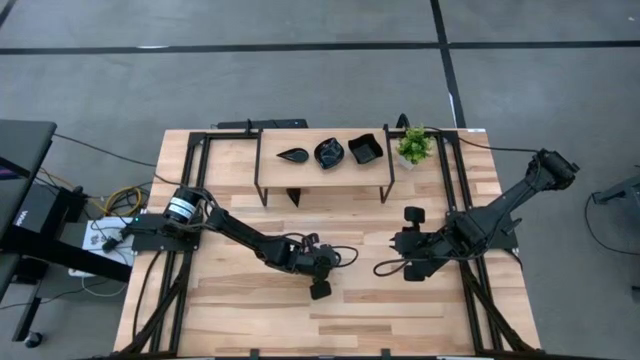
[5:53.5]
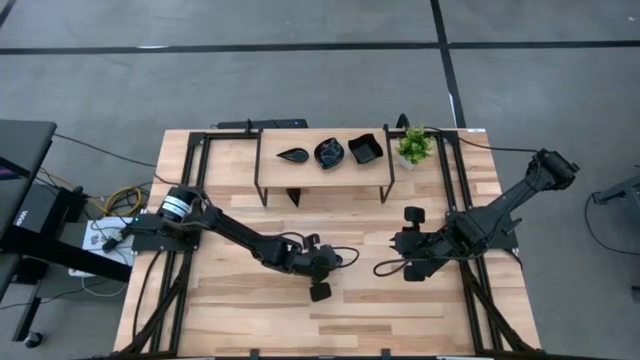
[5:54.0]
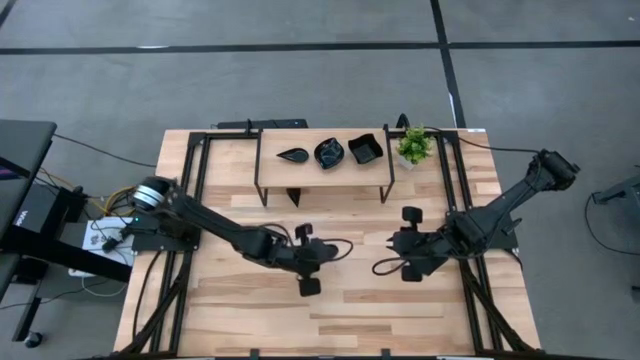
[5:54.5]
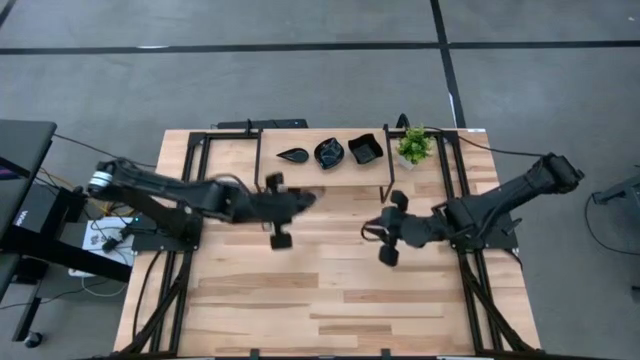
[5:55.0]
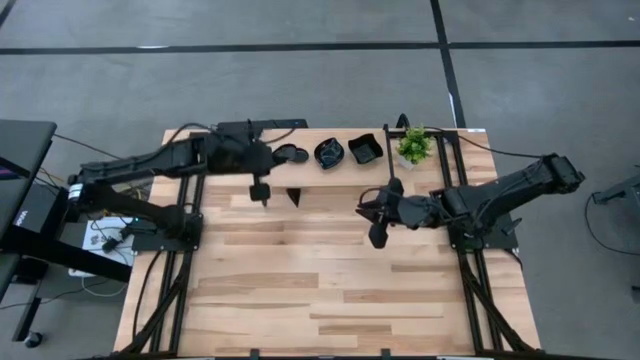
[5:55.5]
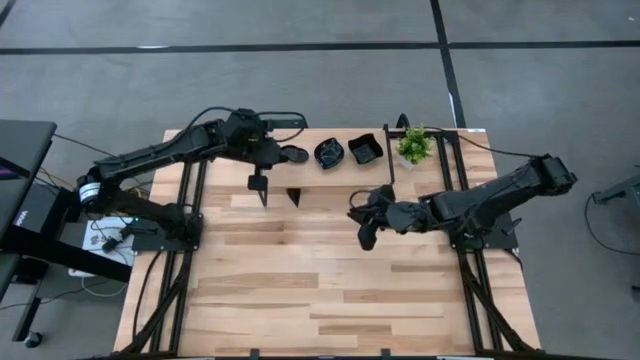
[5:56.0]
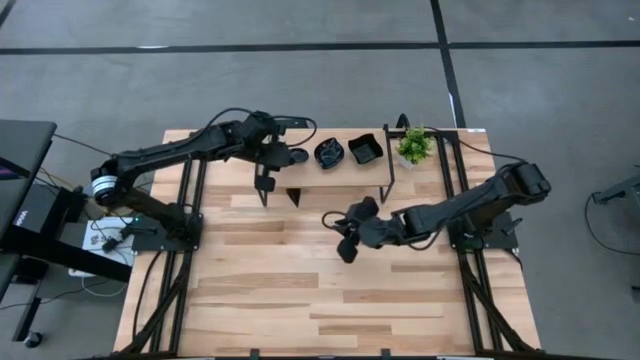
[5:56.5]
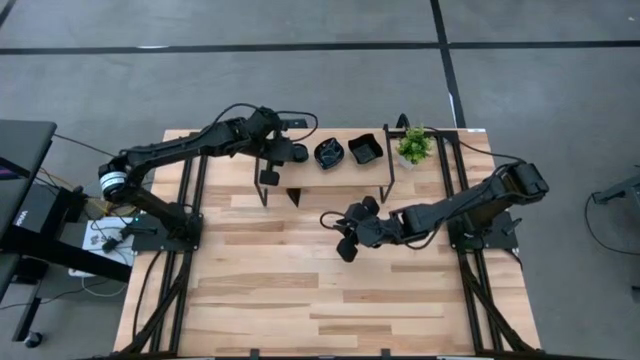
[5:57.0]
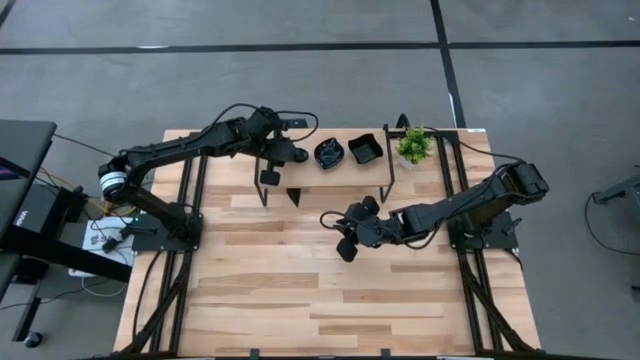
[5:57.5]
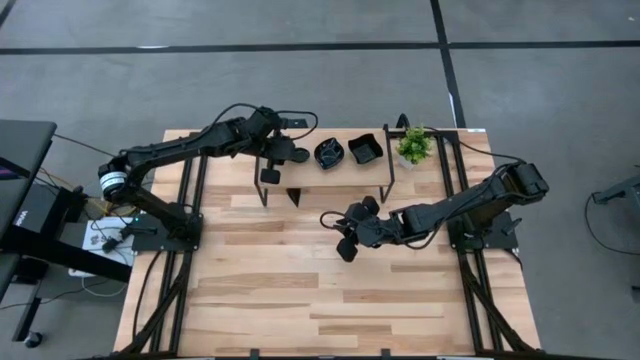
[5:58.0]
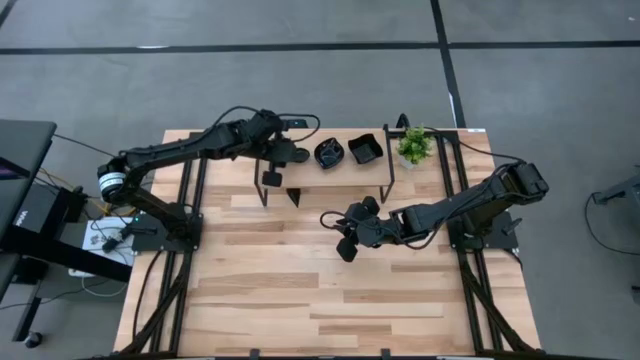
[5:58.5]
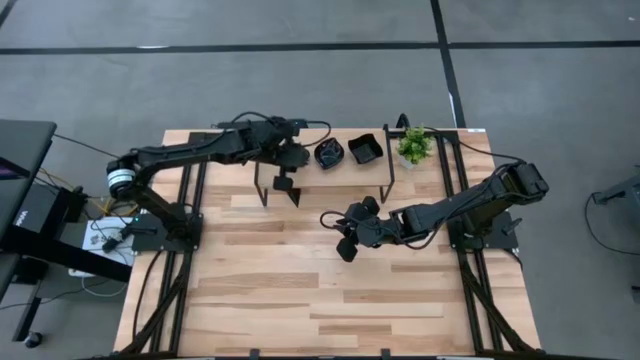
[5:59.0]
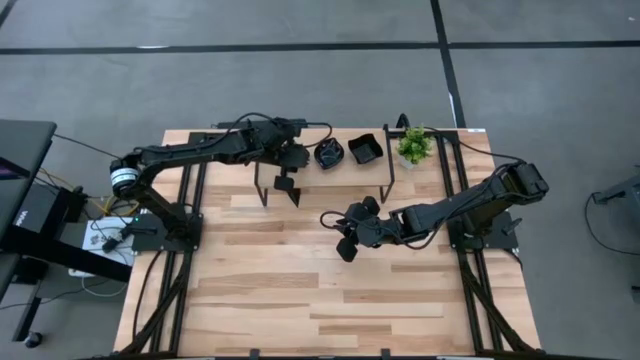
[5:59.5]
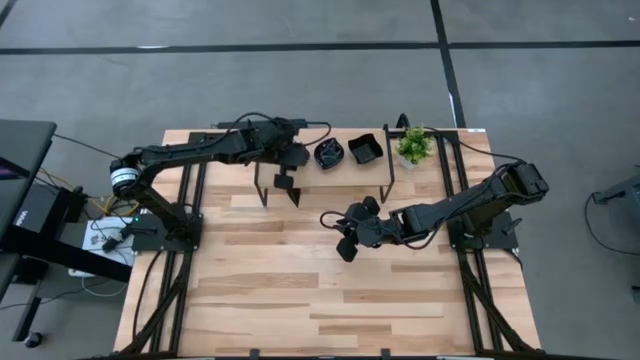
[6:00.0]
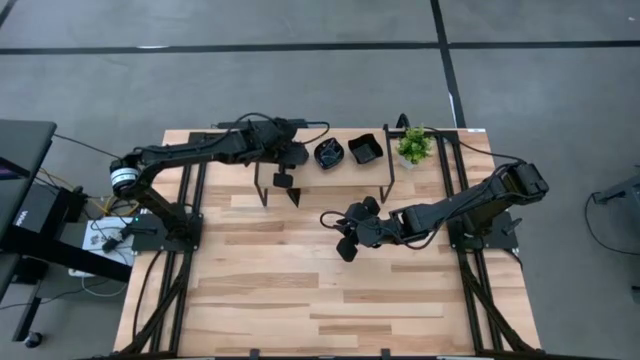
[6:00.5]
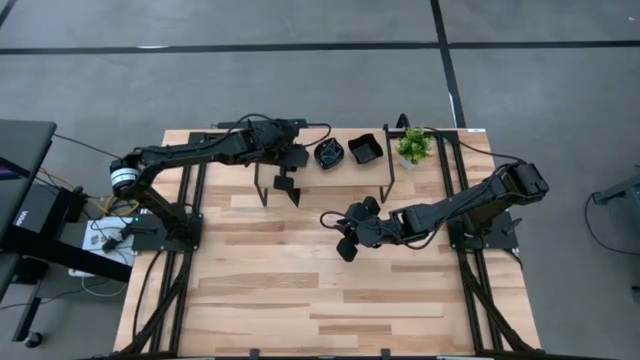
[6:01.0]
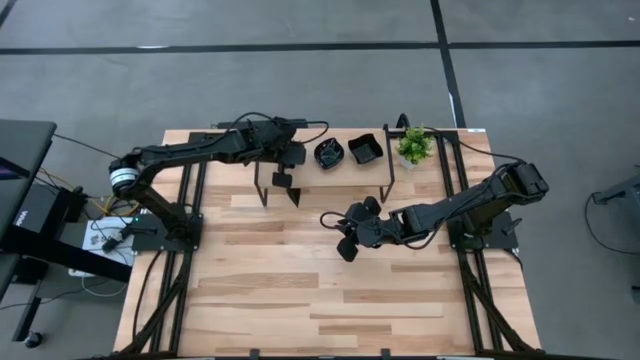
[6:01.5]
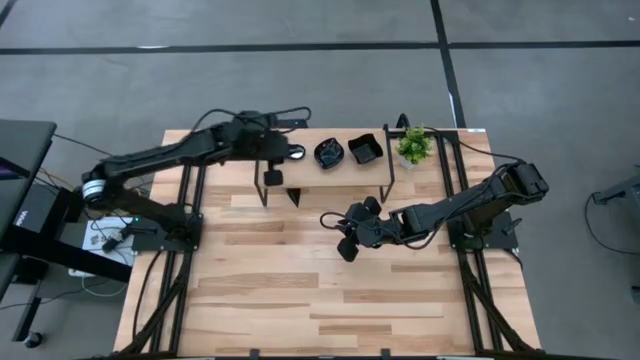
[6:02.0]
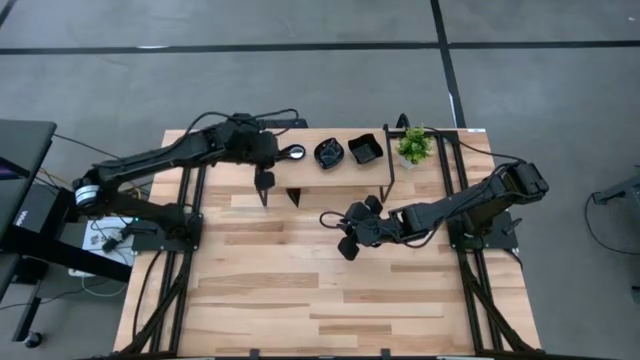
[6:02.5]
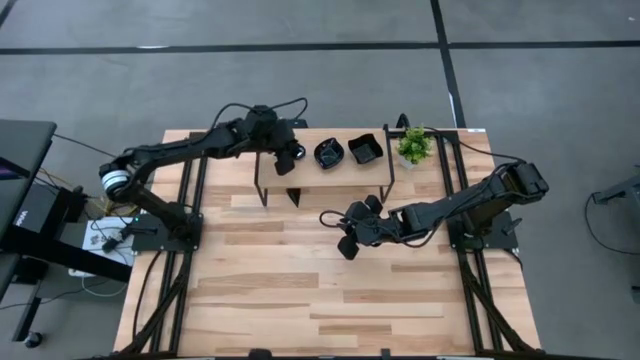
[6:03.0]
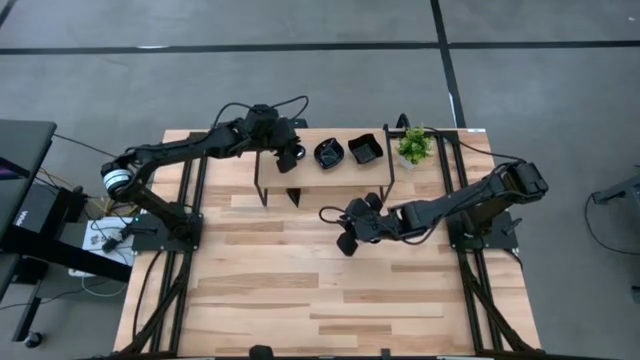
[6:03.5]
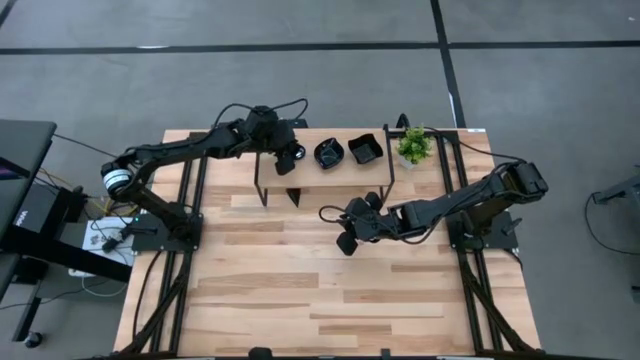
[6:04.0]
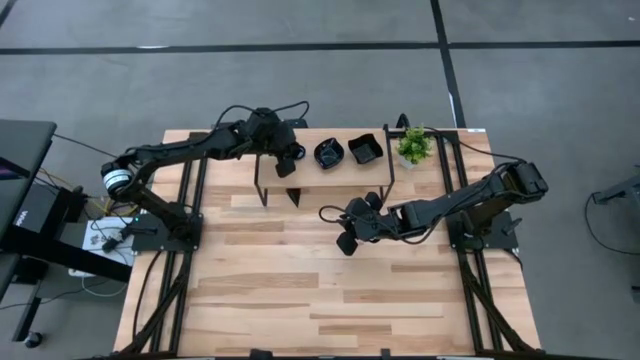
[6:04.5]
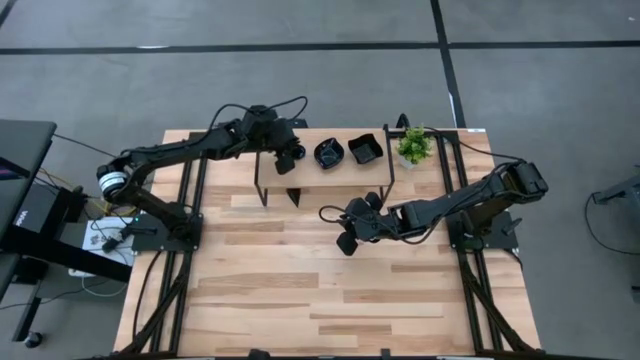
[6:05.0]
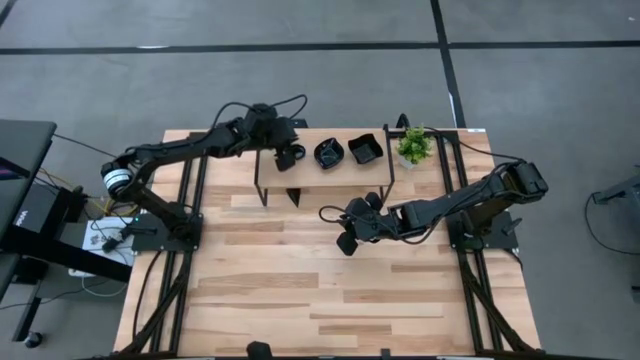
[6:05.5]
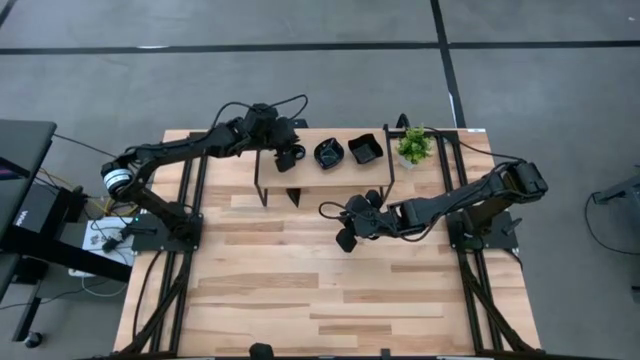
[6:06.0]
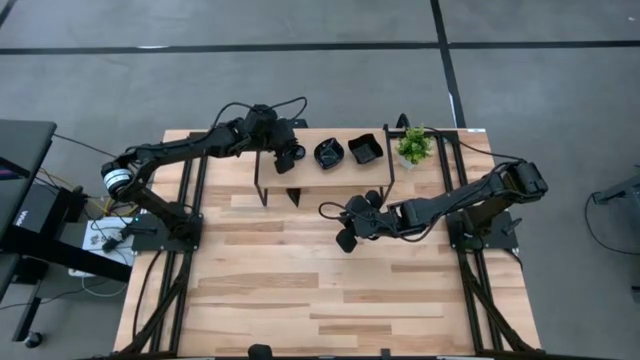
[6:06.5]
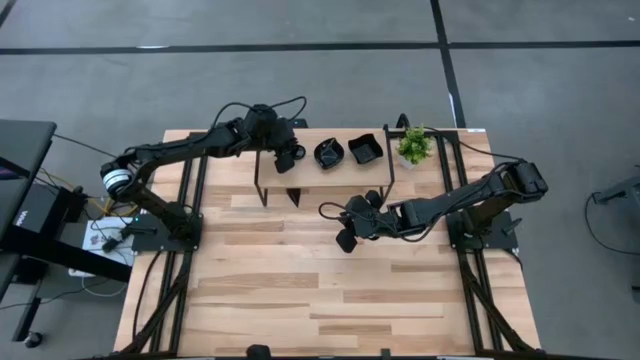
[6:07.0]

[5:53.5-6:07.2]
Task: Pick & Place Mini shaped plates
Stack the black drop shaped plate on the black drop shaped plate on the shelf

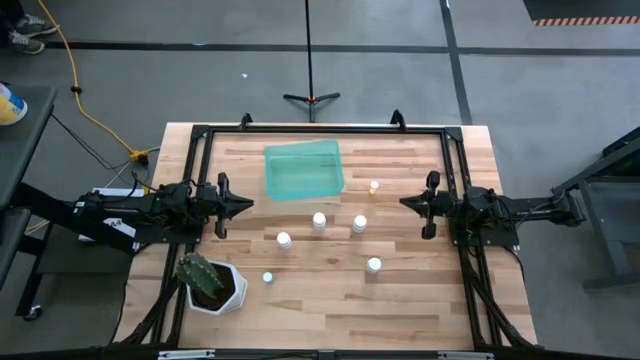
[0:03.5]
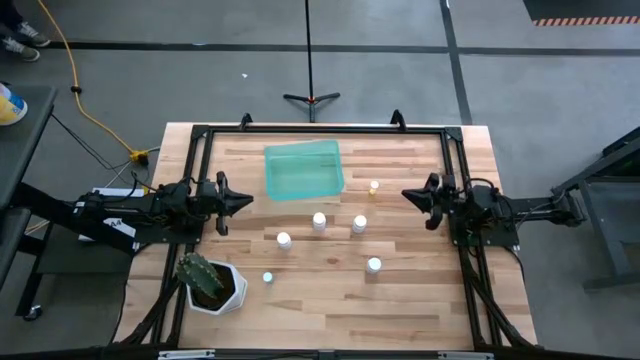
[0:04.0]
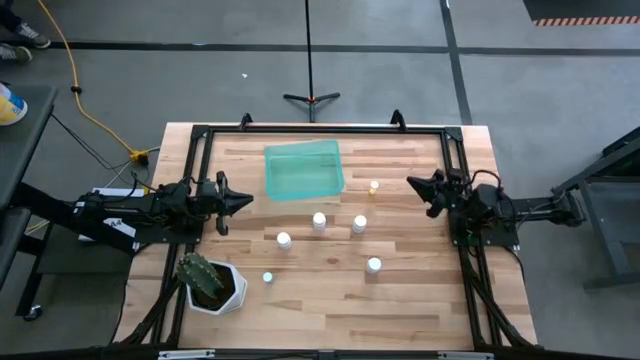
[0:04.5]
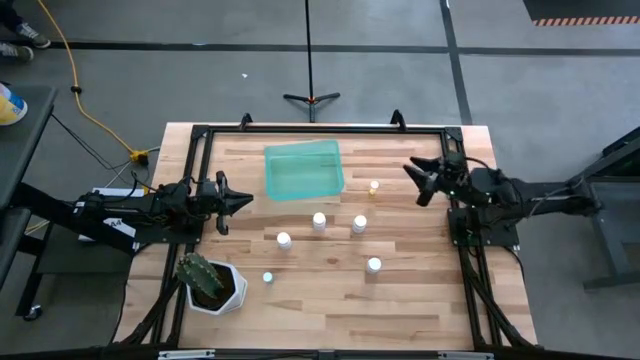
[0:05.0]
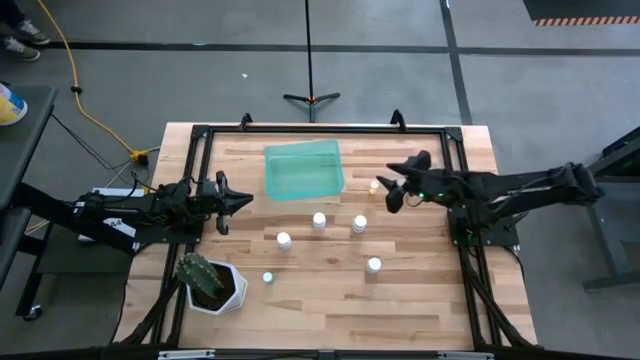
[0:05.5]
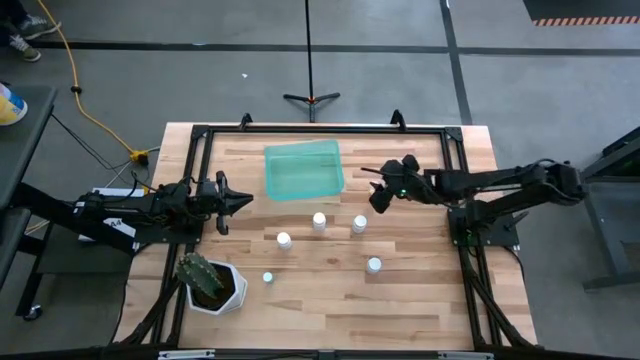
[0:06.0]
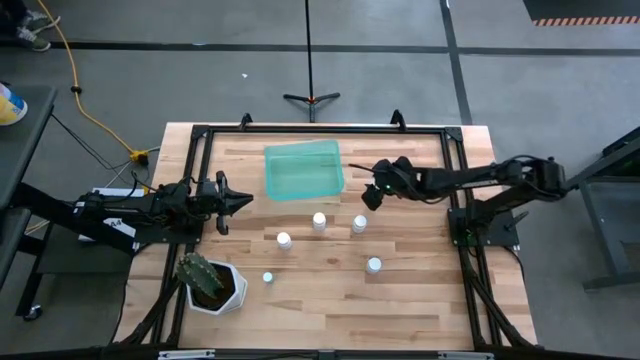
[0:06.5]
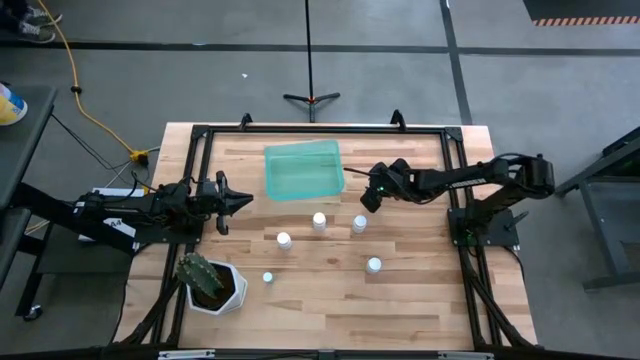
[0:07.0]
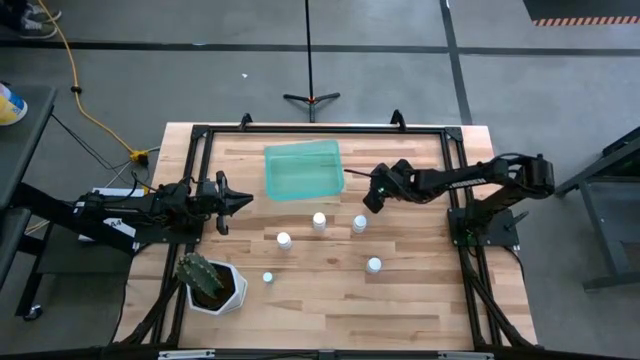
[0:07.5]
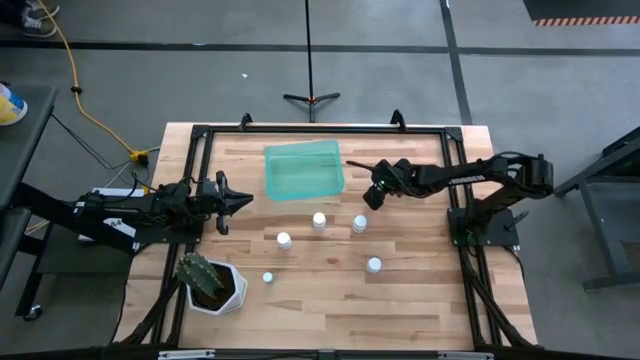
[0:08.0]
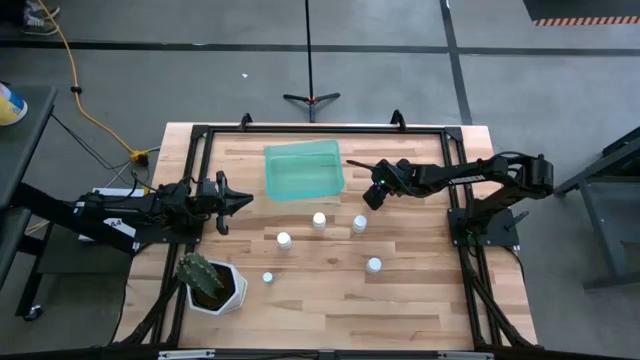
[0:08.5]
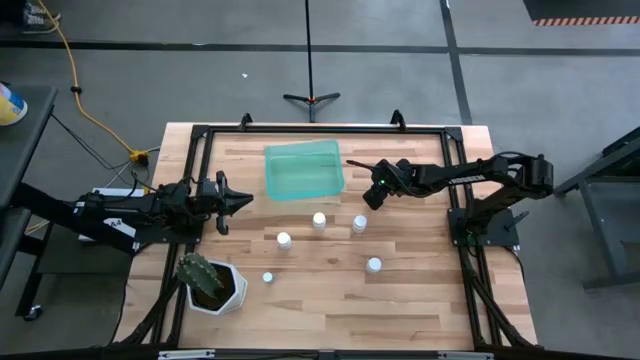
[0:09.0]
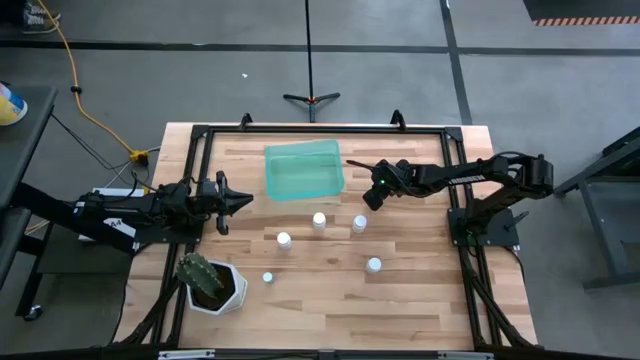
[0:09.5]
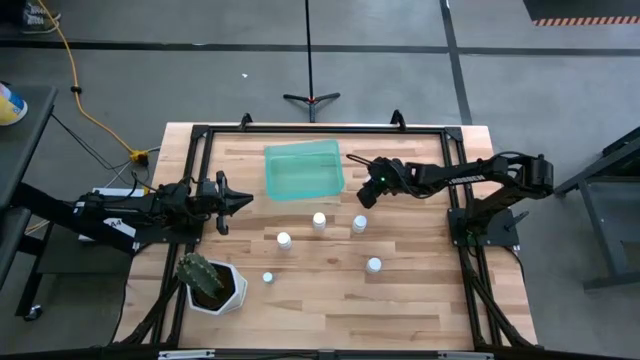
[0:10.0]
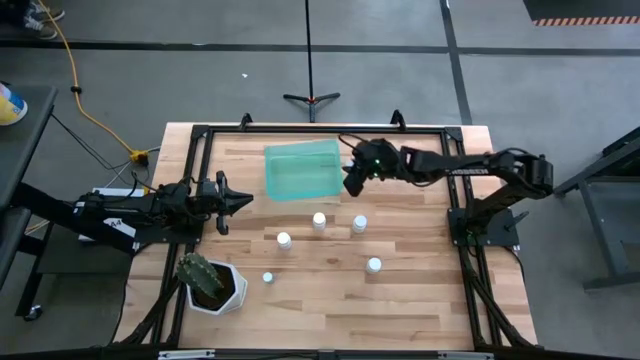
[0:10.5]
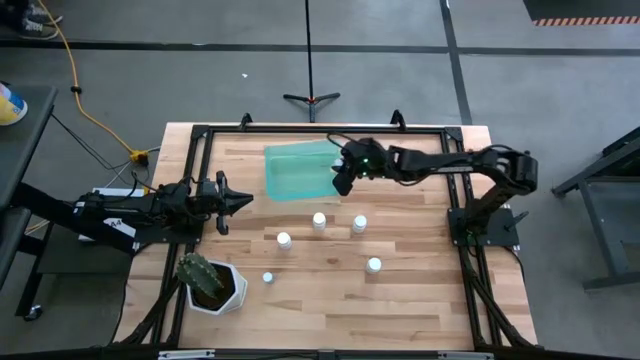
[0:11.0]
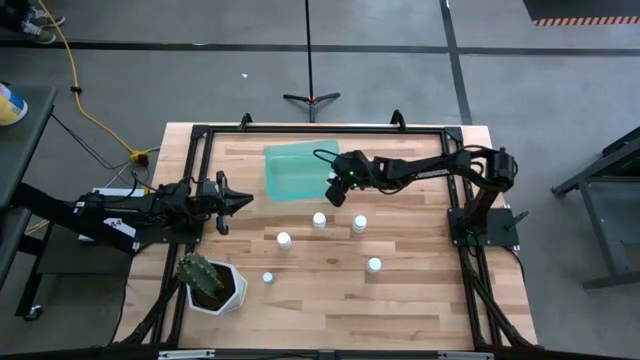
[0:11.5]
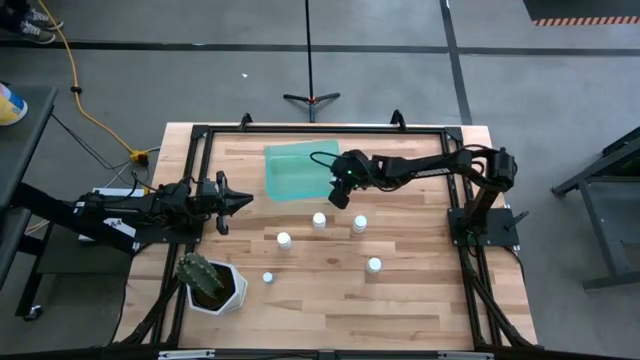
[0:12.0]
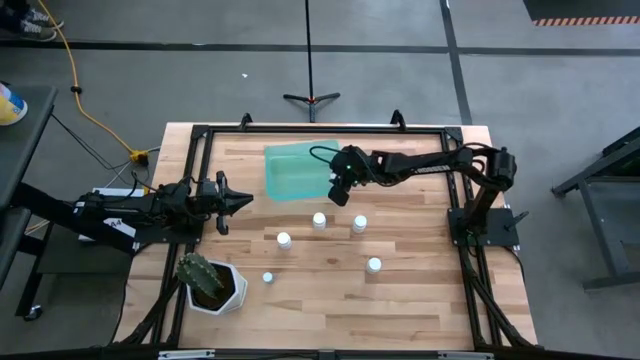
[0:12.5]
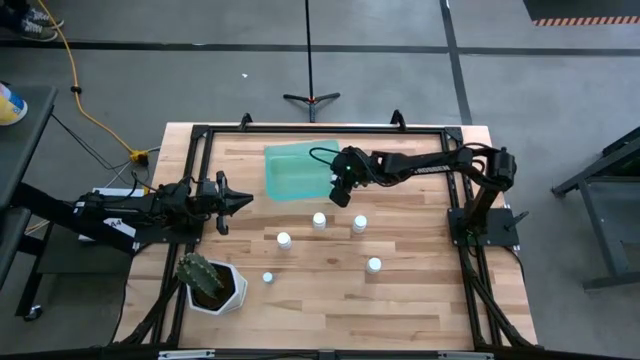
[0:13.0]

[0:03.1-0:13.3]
Task: Pick and place pill bottles into a basket
Put the yellow pill bottle into the green bin
